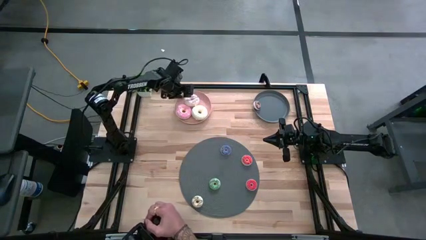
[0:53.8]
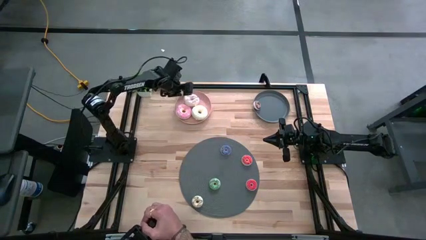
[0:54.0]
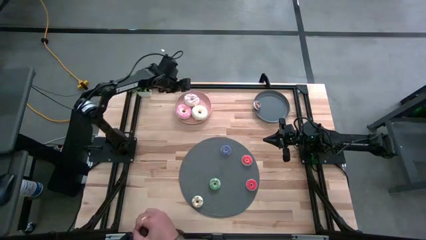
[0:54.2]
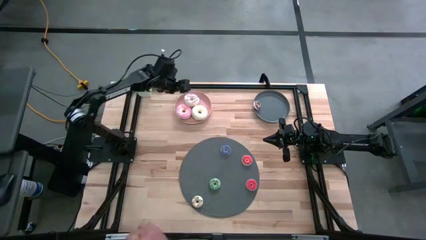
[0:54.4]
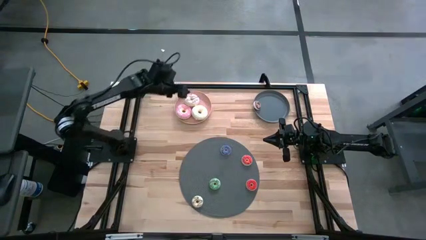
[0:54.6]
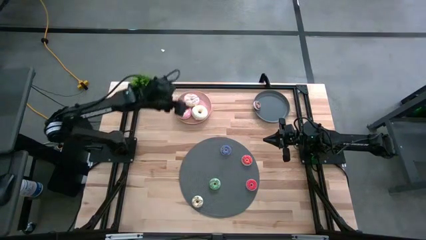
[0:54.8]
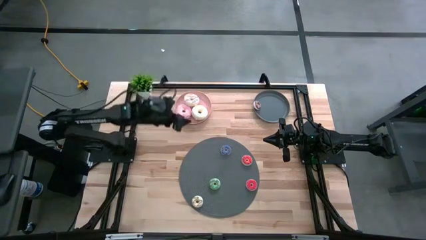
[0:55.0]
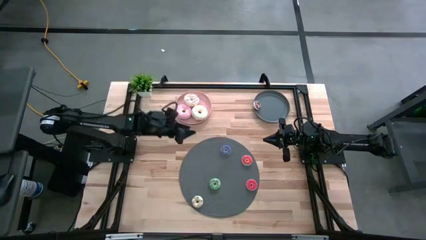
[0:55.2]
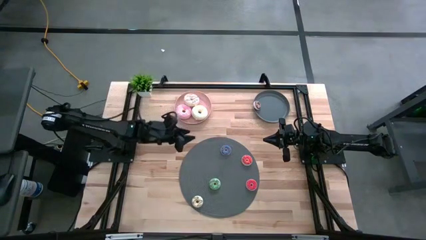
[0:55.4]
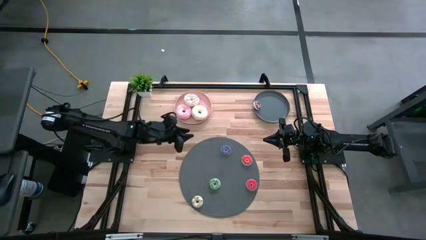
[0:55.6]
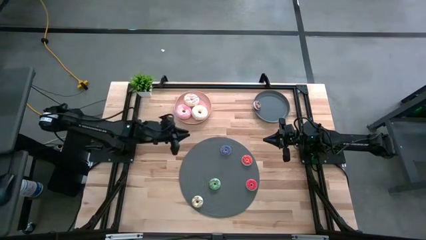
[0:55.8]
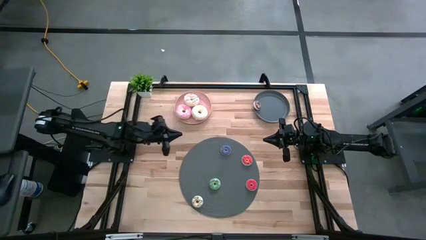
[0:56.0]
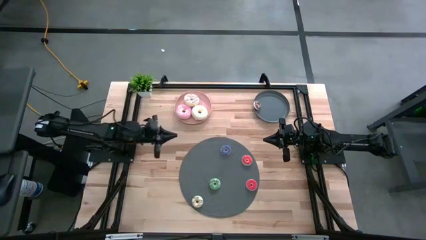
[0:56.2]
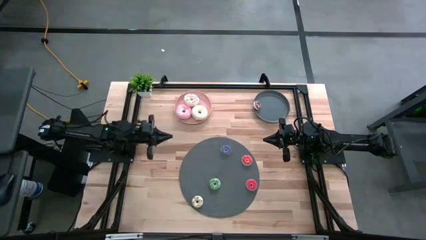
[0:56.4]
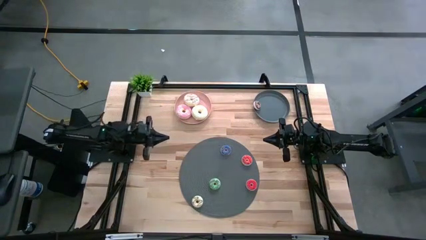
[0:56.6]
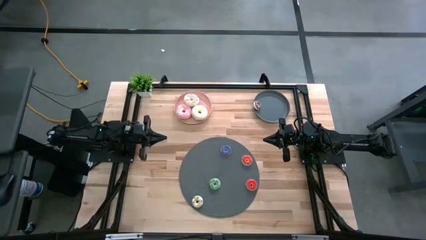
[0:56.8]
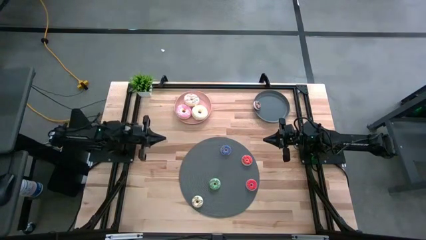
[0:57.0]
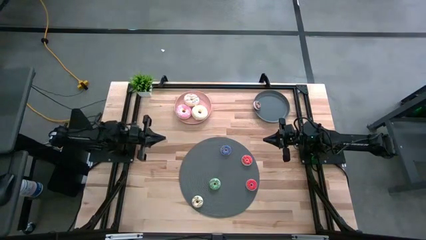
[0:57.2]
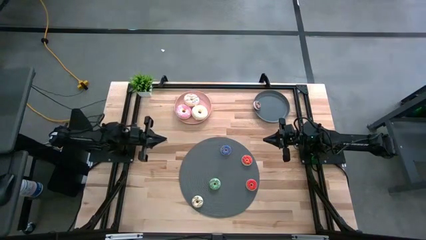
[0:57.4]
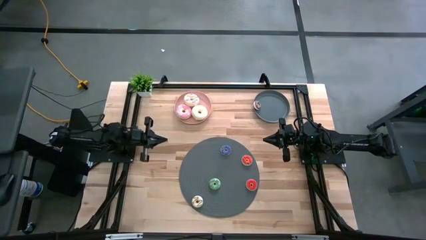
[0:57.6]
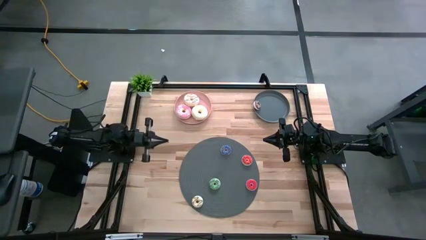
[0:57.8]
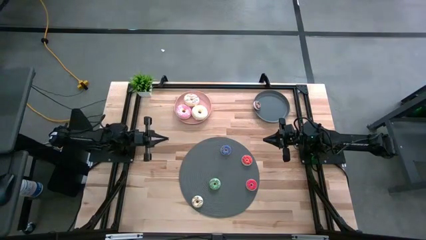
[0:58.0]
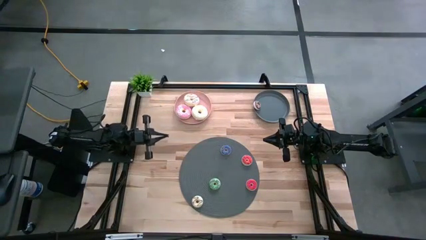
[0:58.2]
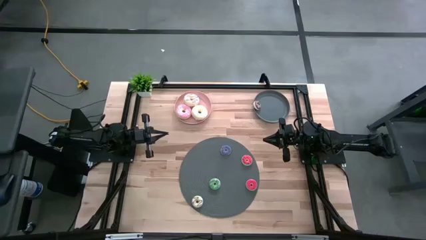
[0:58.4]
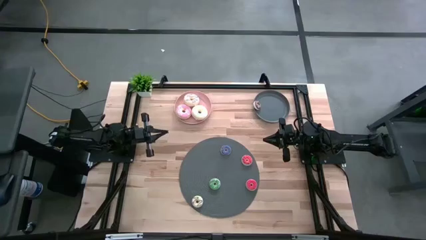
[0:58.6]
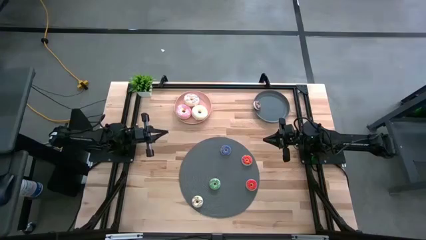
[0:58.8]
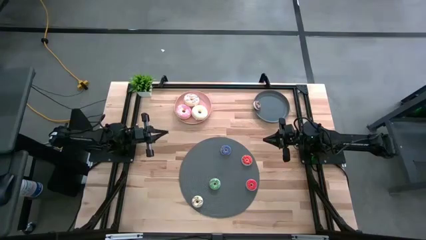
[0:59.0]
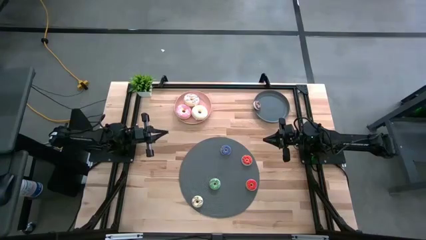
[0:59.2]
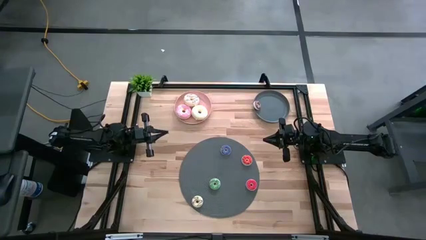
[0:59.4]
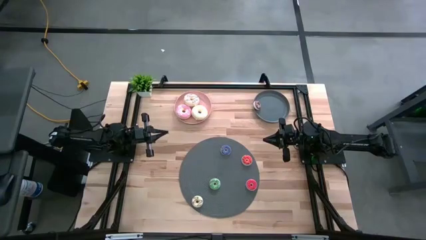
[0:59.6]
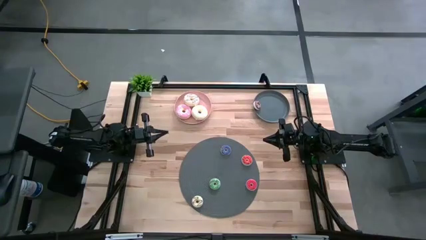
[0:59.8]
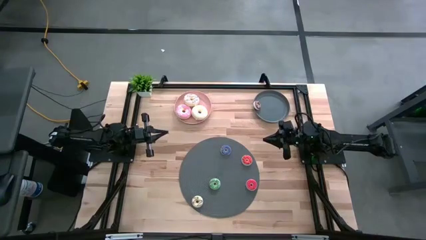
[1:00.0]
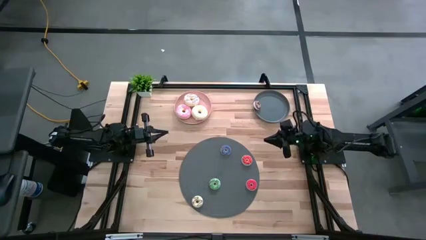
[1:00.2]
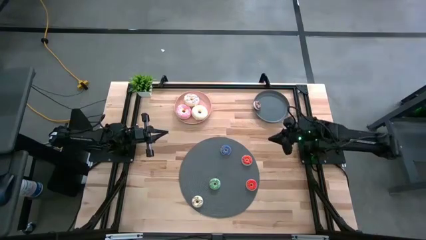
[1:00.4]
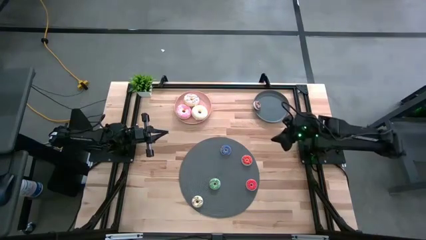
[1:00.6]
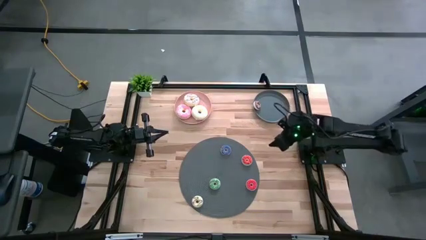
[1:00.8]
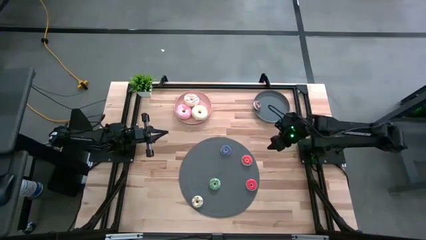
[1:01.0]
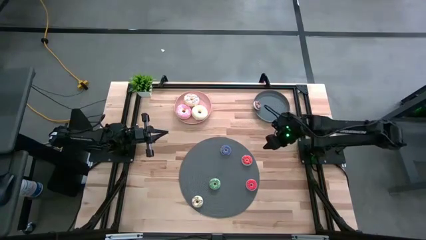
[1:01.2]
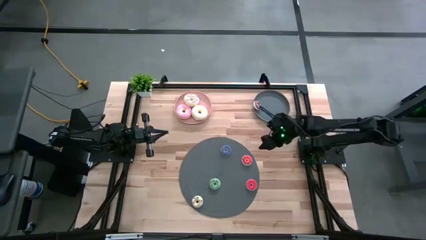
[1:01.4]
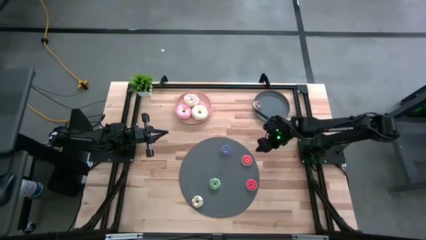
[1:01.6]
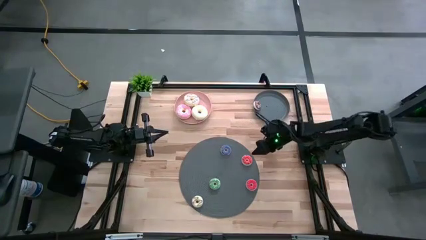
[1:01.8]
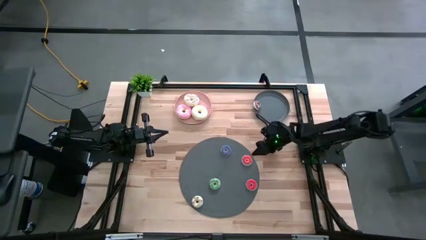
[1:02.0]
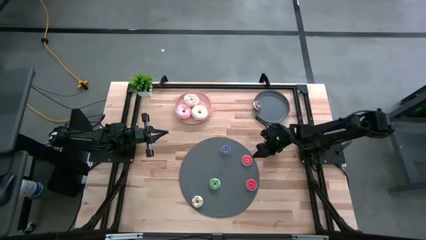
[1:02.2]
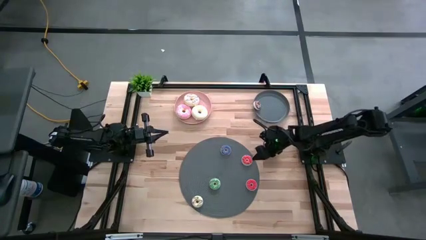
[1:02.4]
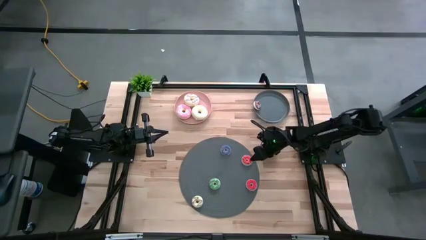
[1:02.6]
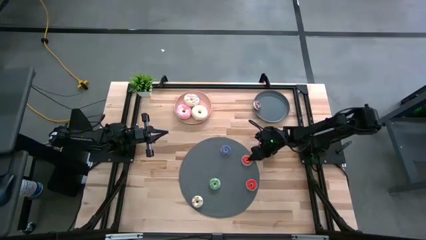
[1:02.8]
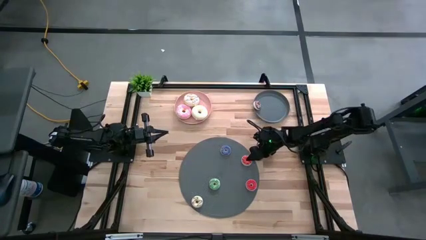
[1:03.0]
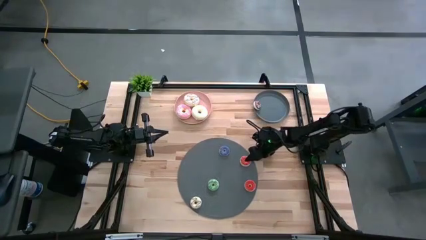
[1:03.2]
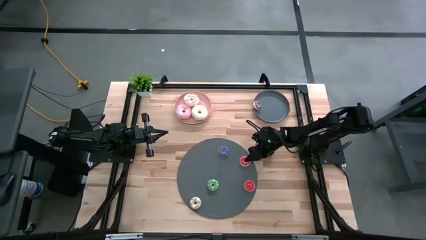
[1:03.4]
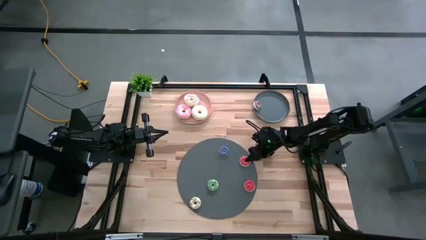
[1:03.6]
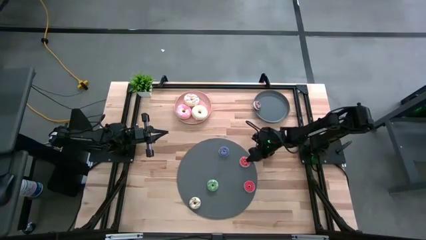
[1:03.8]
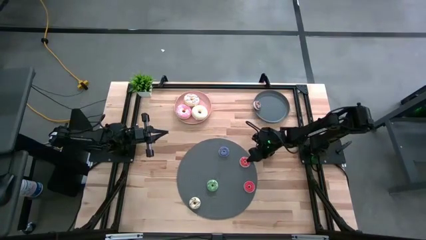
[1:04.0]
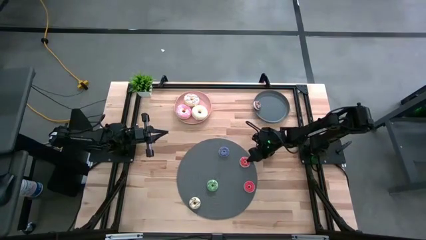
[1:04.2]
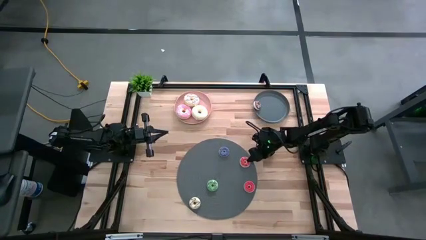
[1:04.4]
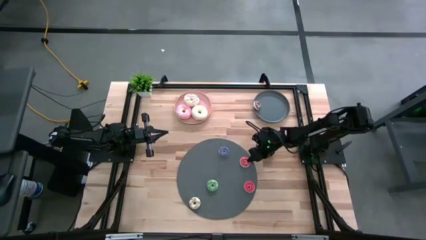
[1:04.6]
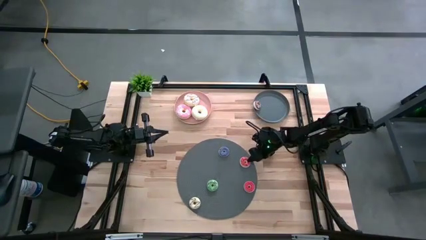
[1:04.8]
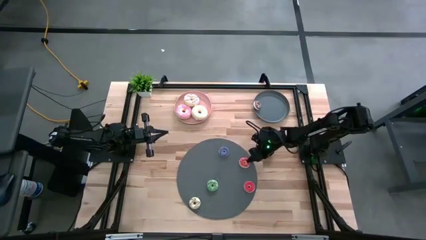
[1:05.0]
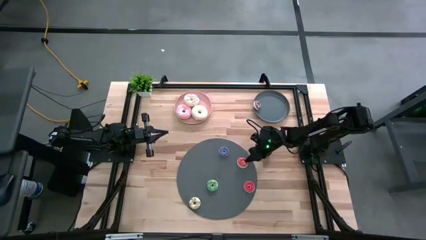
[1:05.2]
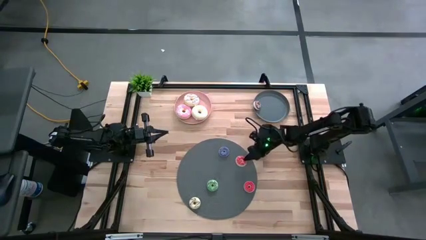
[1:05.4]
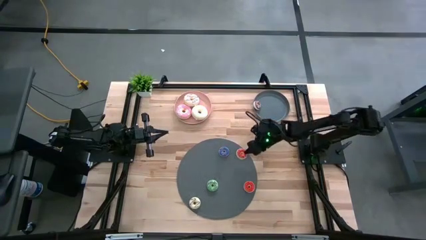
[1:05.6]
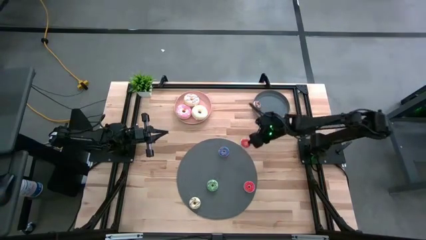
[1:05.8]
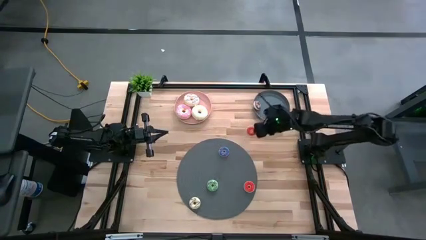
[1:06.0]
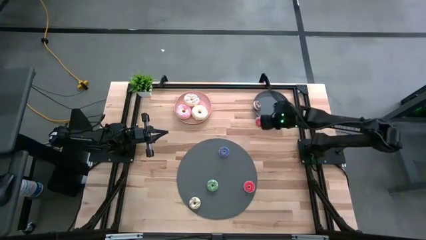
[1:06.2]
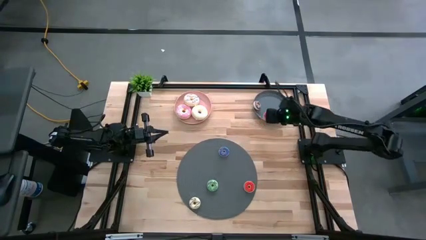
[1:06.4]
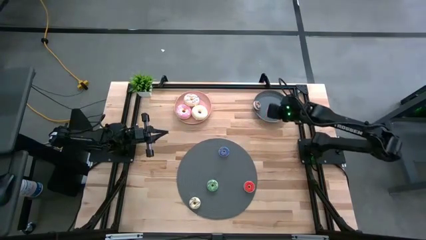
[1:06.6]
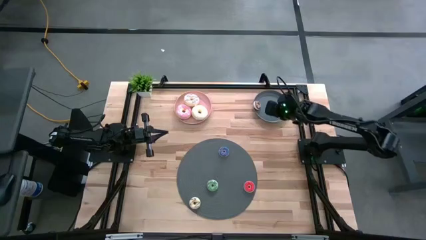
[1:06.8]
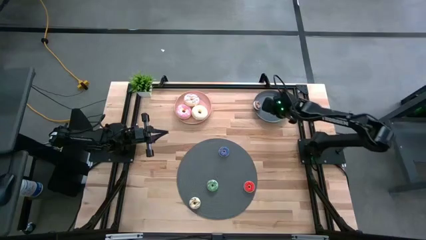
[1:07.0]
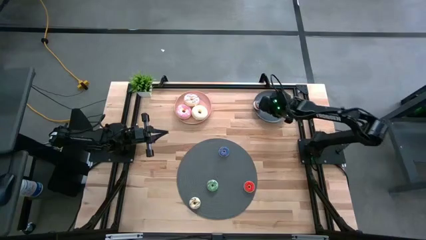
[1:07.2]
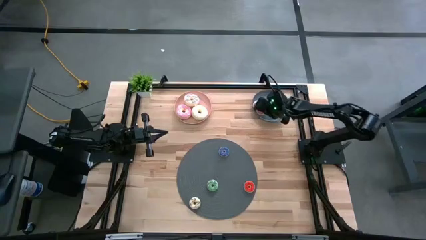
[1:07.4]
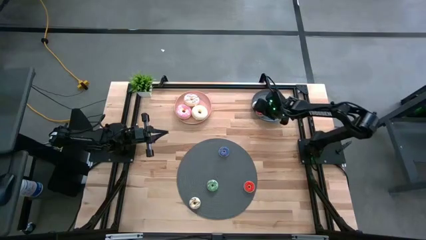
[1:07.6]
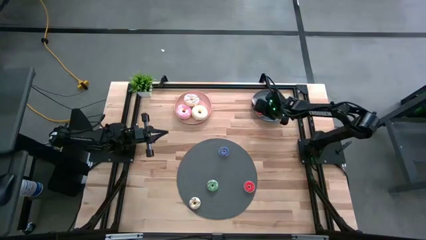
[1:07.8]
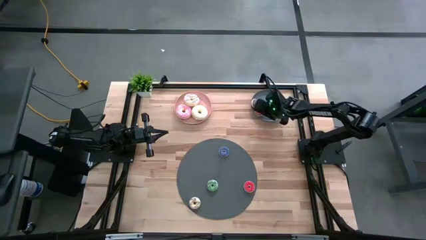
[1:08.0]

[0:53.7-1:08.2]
Task: Pick & Place donuts
Put the top small orange donut on the gray plate

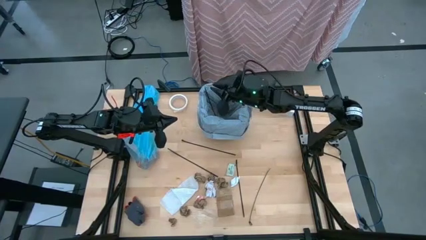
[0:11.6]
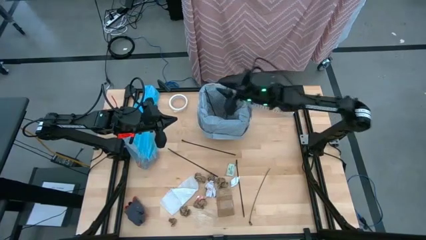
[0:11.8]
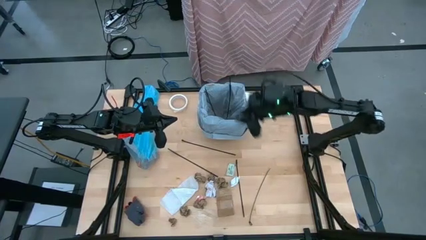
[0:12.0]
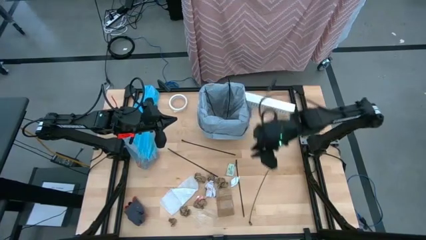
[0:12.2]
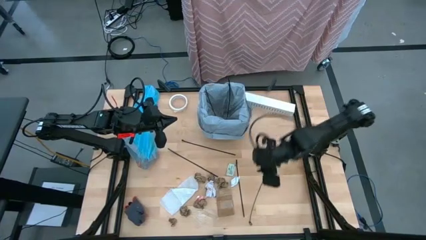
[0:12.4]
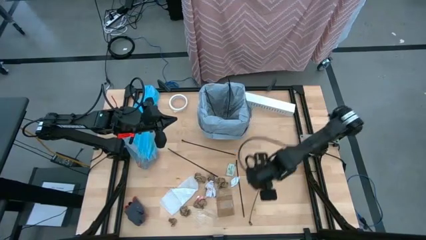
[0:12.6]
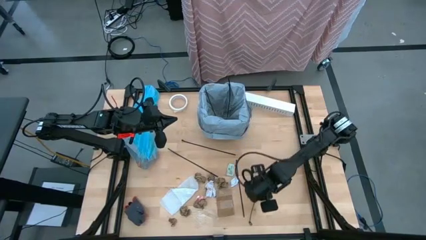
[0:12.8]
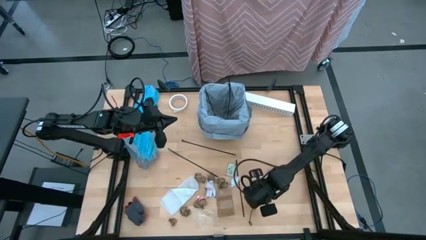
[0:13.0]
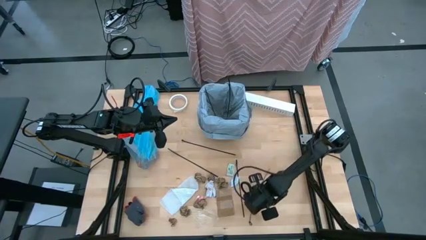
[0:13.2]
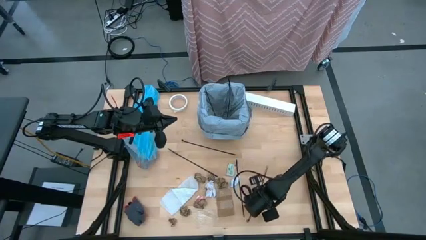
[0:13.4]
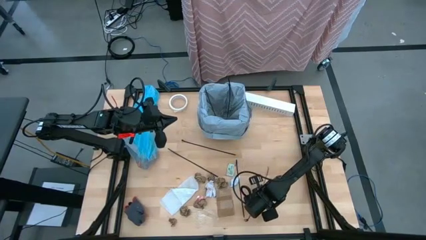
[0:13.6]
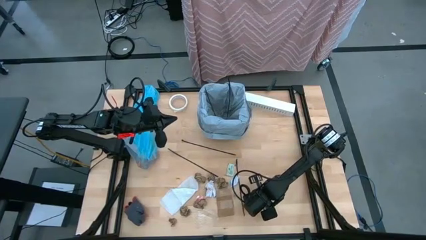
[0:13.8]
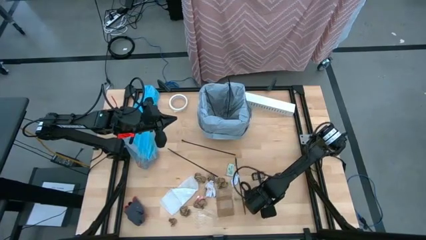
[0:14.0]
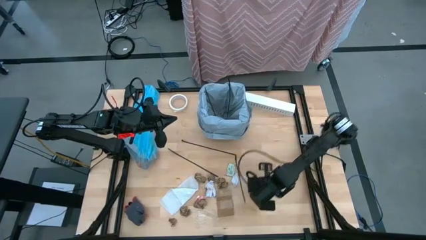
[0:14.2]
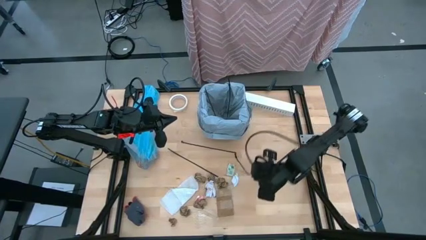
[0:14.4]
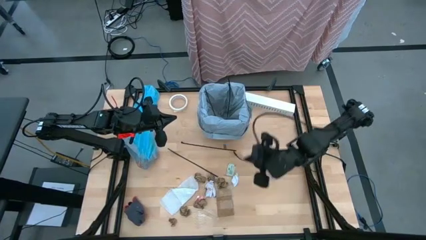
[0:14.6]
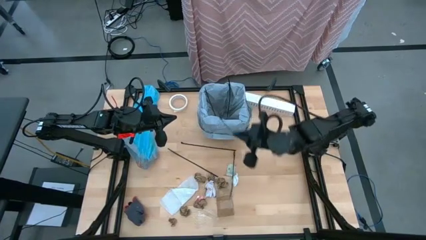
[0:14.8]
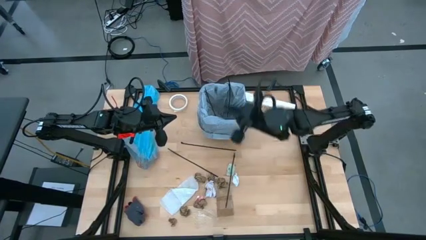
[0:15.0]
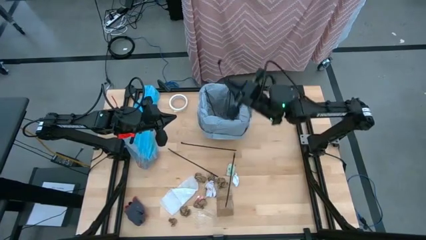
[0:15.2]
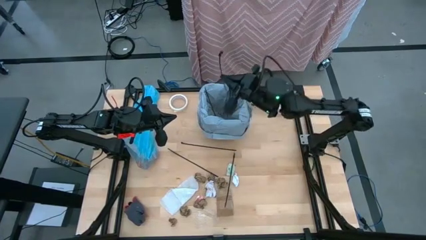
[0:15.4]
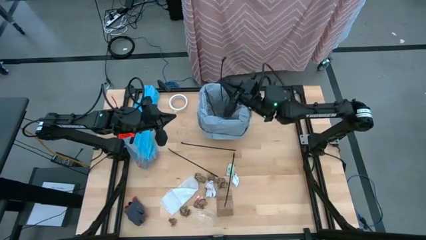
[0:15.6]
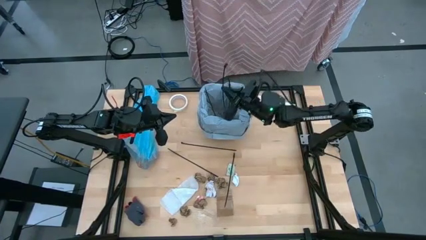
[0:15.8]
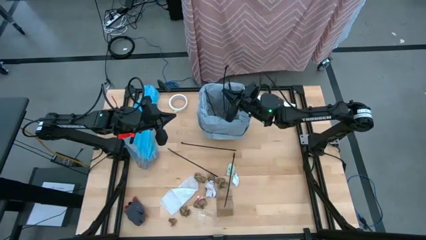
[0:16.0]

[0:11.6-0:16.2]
Task: place trash/remove bag and relplace
Put the zip tie into the trash bin
